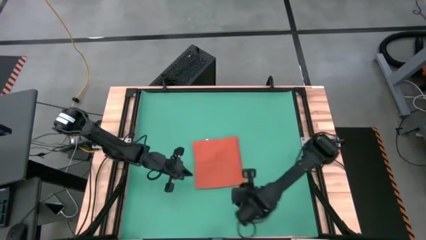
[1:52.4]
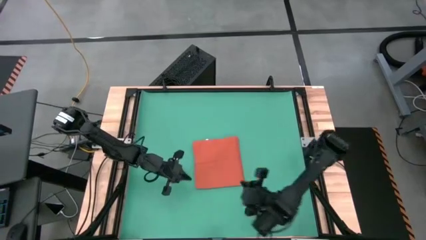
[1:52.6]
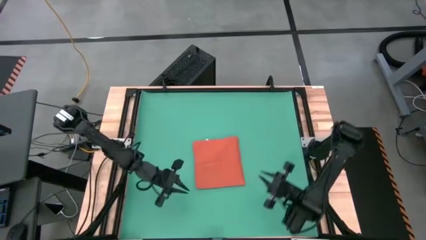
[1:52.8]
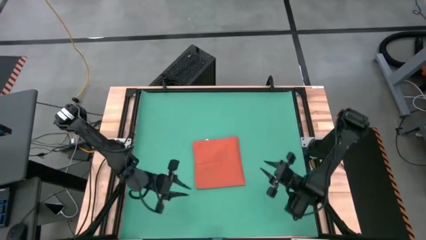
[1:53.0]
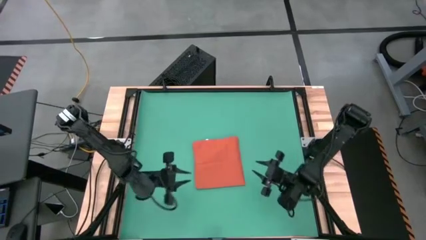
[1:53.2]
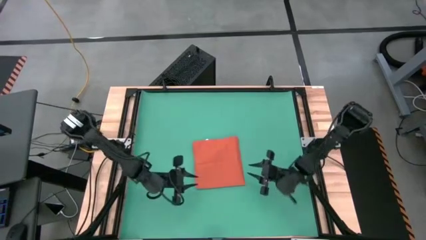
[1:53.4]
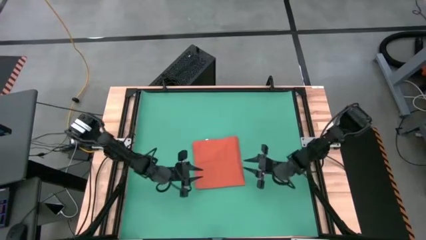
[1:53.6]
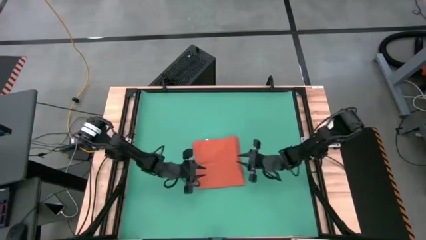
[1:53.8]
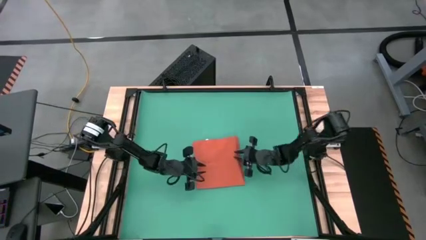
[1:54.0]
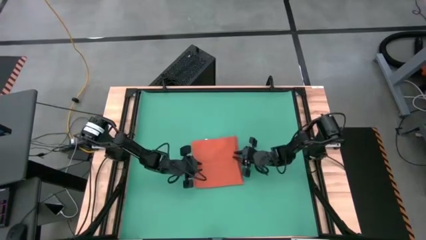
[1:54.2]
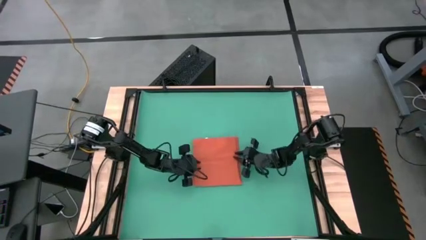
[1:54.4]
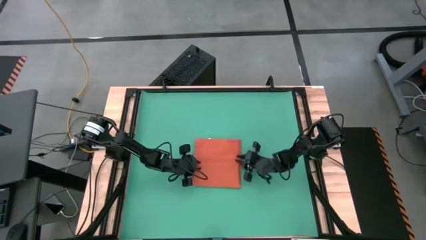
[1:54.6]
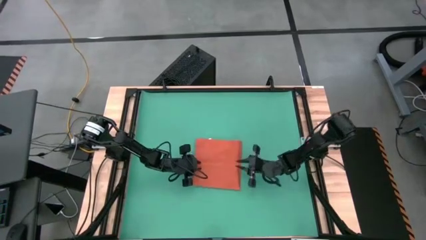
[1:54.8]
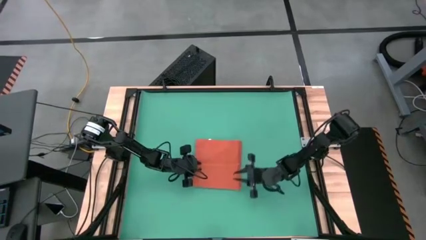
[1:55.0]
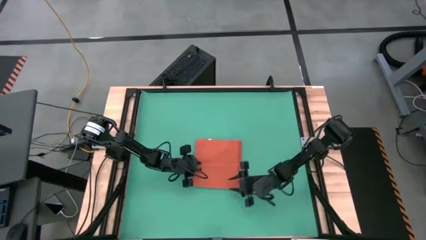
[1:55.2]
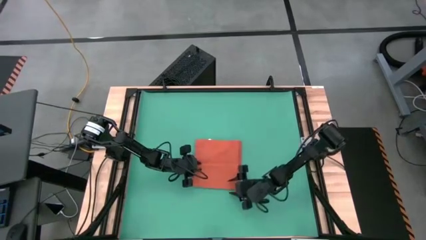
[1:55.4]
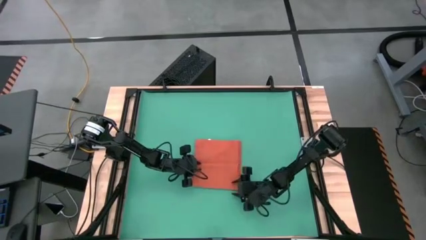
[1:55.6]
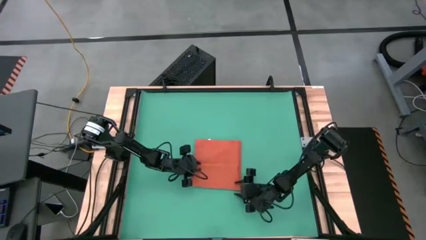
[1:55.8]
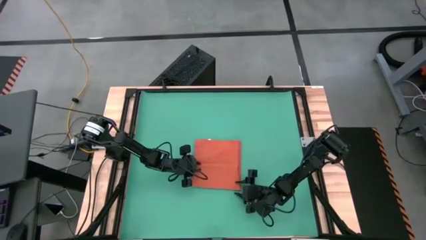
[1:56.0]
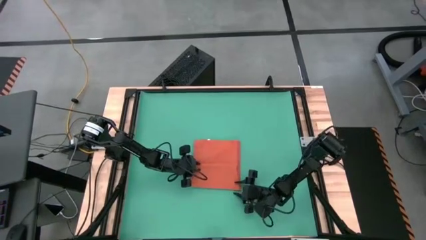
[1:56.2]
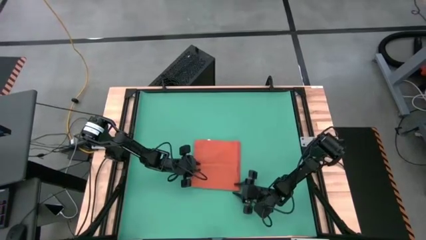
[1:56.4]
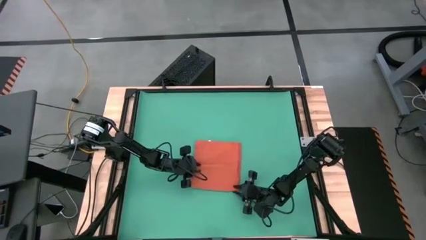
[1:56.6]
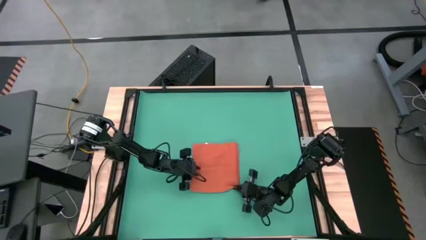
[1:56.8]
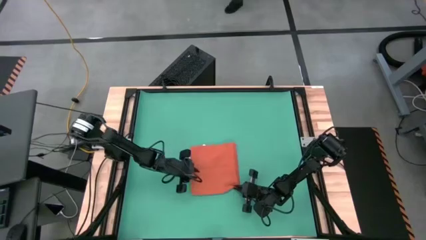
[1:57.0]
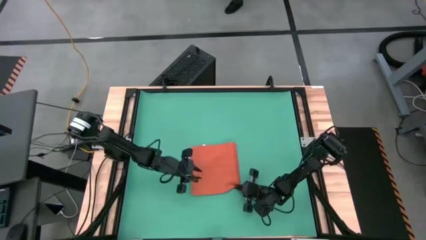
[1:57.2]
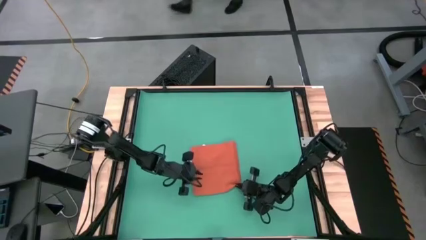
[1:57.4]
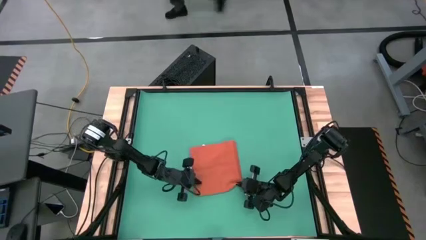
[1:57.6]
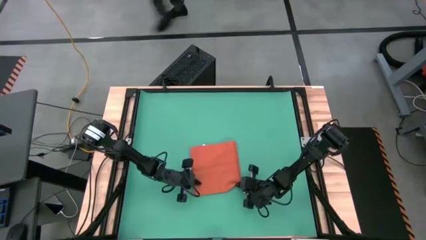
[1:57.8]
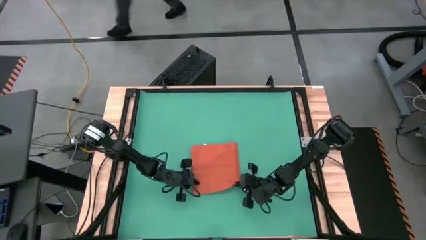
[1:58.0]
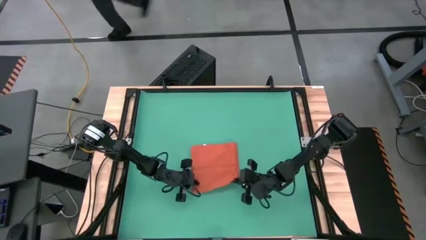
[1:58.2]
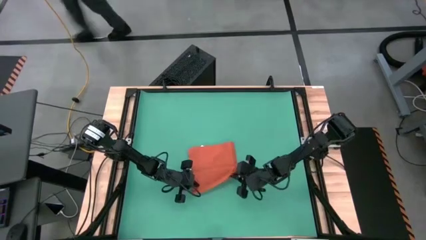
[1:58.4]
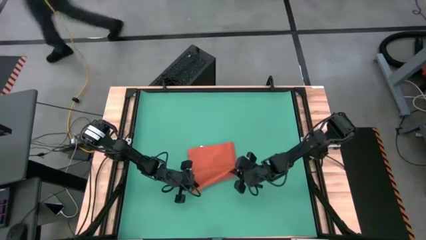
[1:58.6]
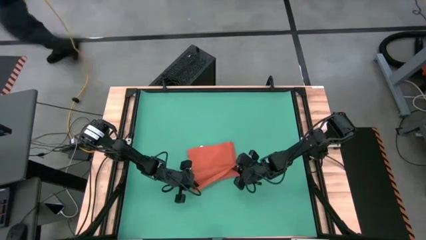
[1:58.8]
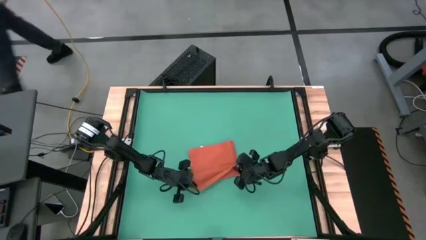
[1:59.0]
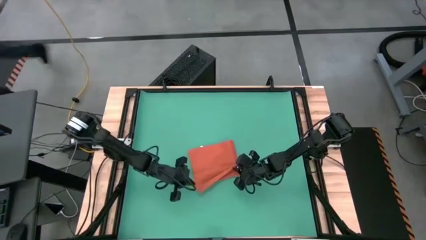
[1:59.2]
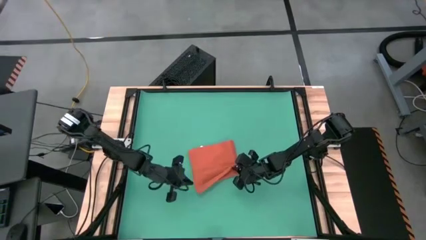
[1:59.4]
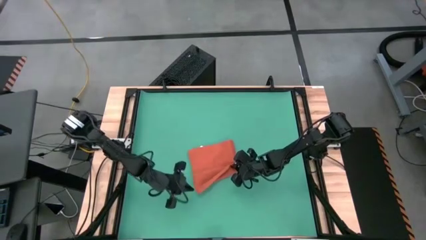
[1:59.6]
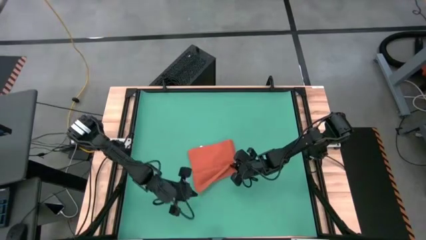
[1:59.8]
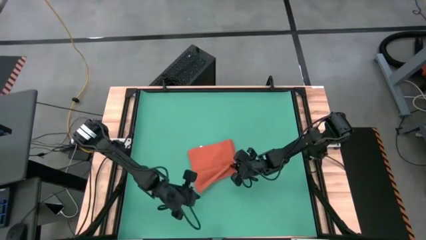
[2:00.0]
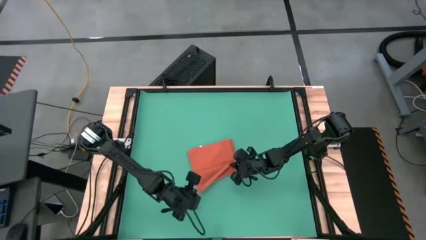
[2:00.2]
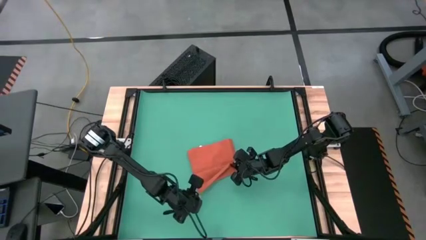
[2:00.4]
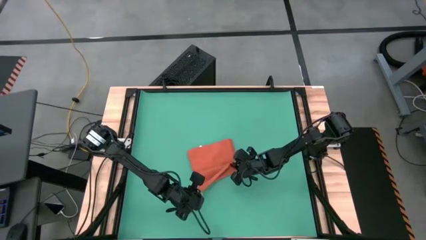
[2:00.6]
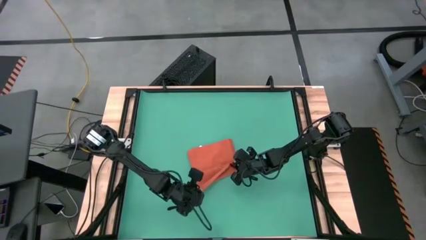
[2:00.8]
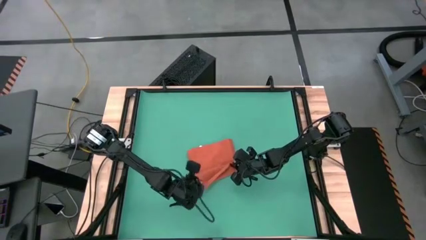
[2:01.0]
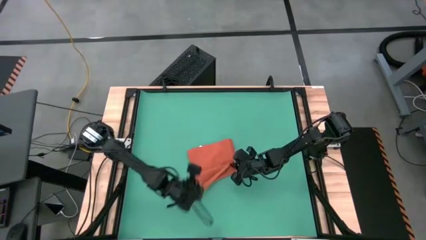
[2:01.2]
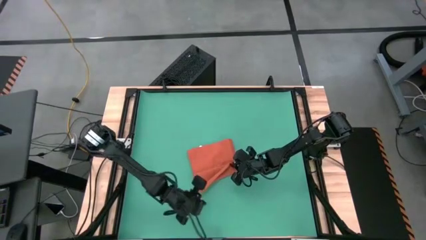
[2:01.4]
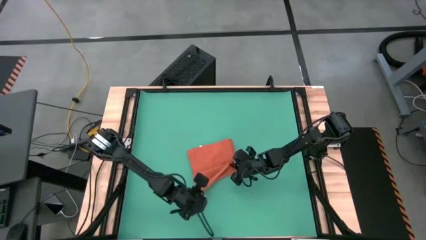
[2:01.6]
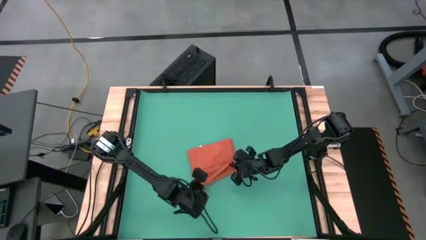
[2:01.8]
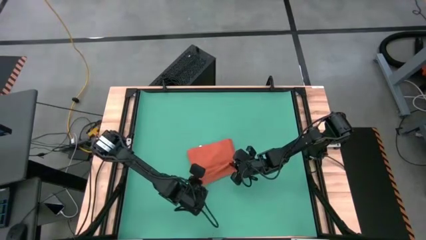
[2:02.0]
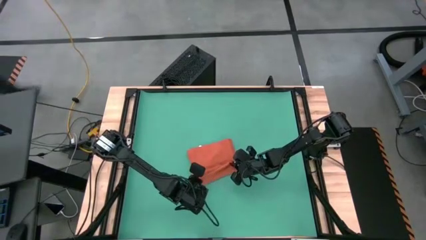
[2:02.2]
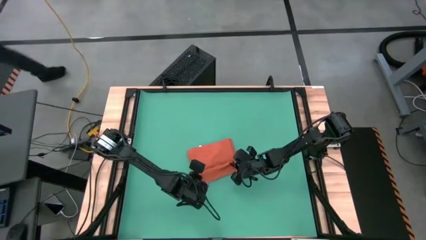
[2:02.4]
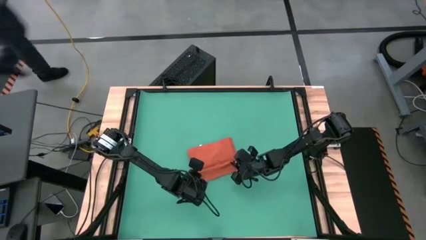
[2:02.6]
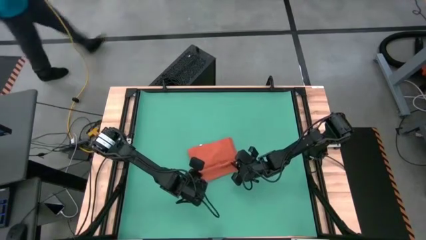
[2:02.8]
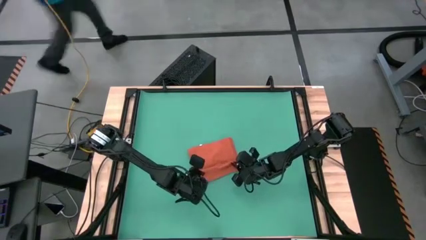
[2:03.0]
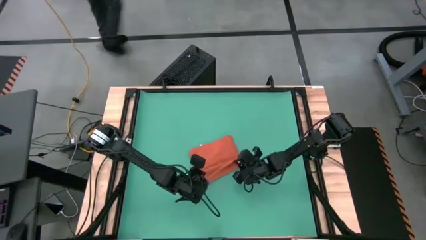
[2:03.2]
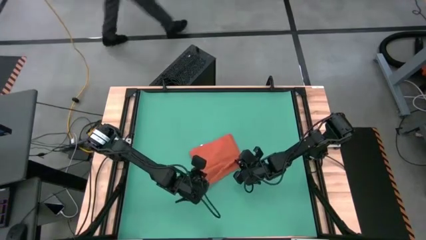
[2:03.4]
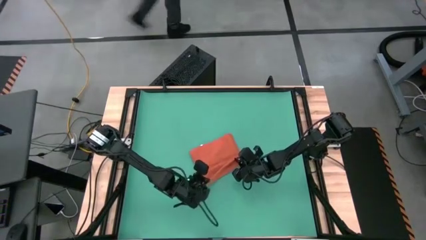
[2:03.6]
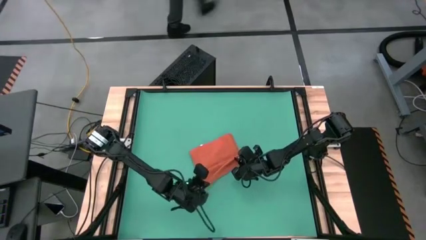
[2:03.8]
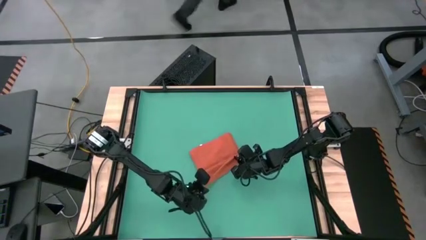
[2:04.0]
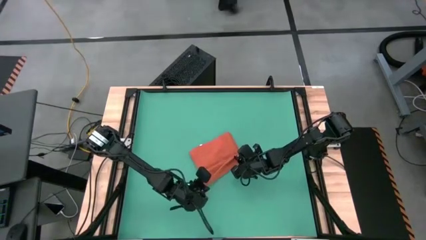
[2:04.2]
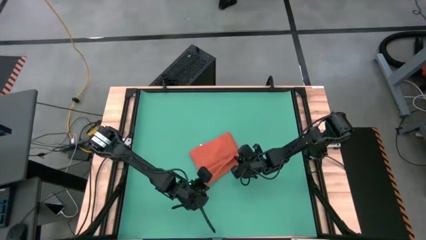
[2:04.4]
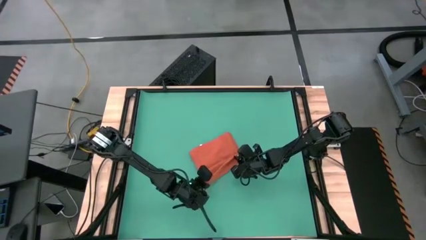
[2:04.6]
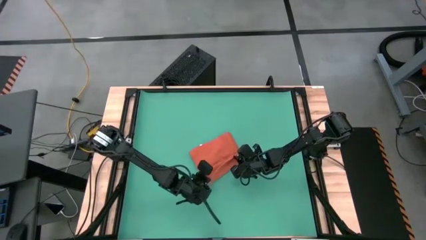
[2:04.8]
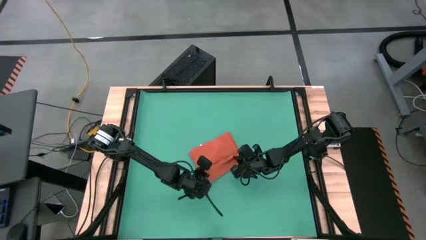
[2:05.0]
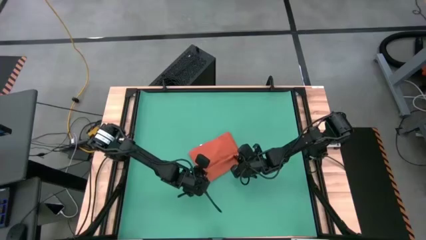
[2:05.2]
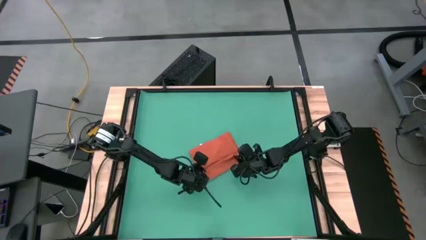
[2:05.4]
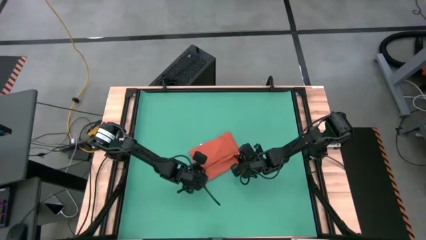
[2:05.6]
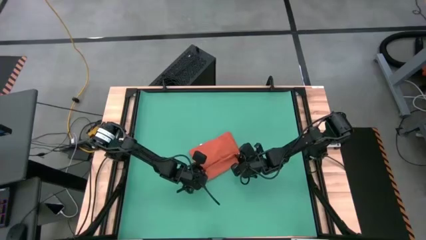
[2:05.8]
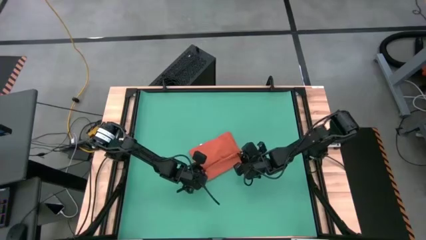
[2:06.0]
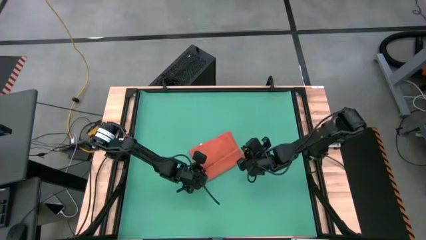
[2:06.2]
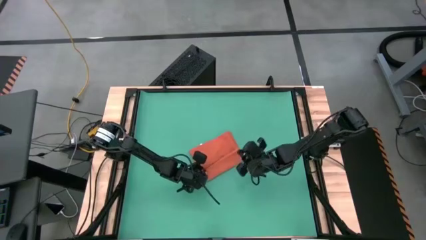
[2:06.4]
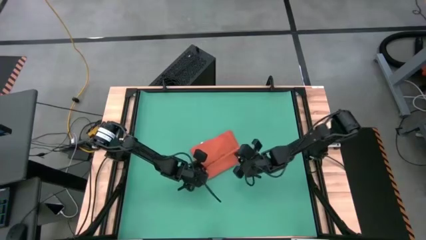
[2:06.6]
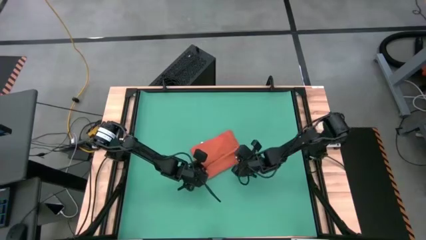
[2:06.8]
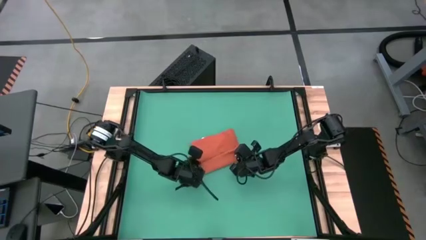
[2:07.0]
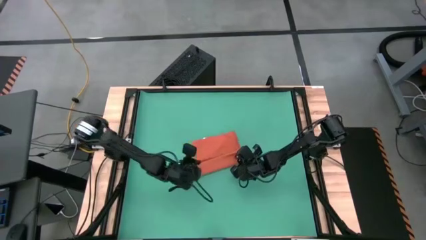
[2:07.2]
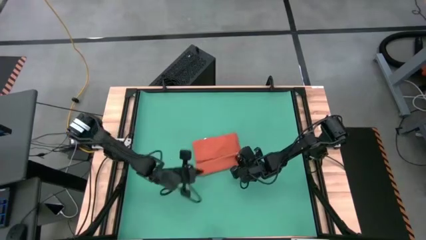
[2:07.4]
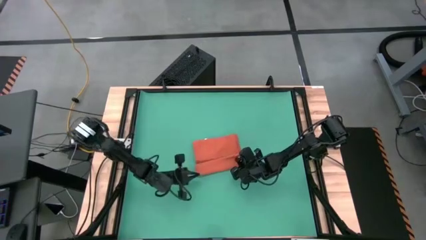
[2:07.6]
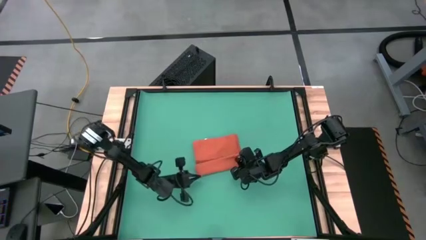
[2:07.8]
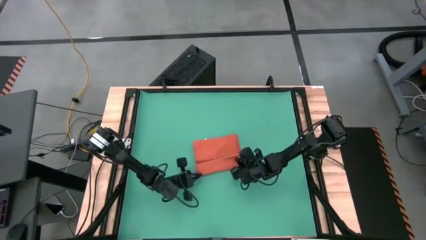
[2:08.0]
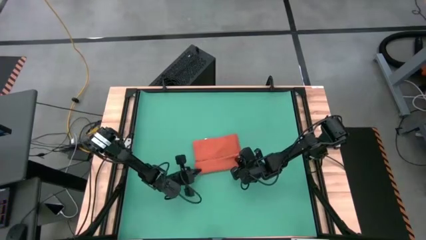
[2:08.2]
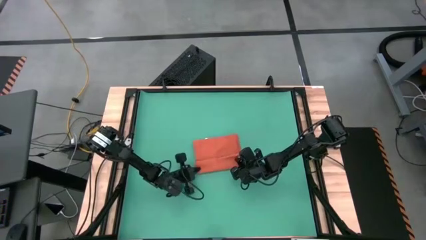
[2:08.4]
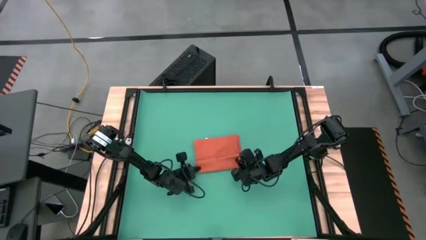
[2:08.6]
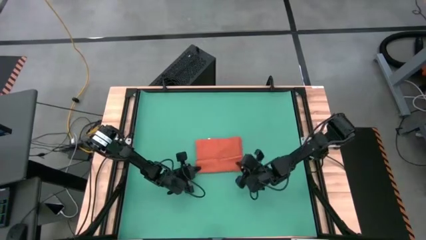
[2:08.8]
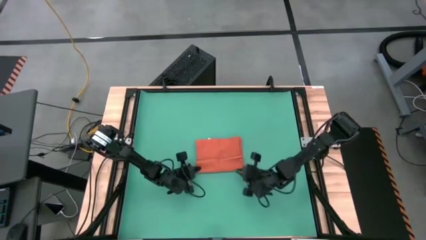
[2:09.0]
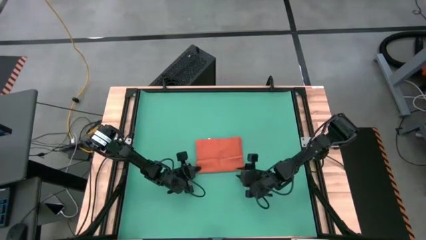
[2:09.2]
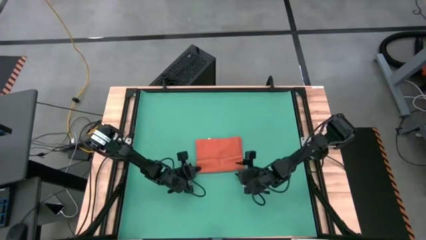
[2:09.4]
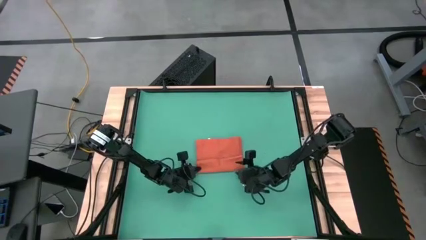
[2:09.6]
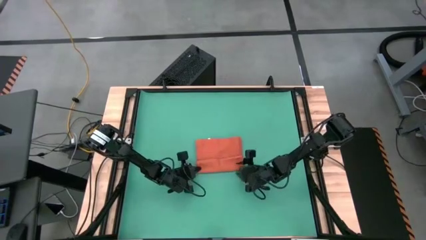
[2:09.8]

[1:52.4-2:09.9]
Task: Roll towel
Roll the orange towel
